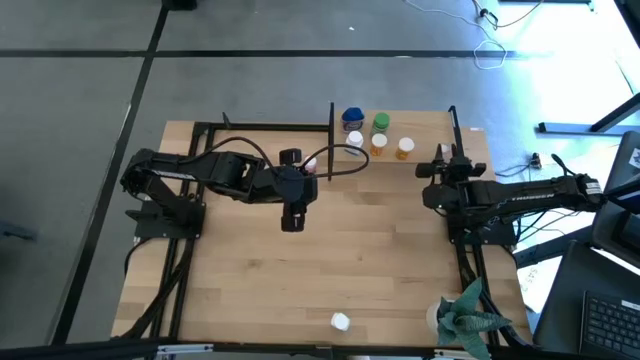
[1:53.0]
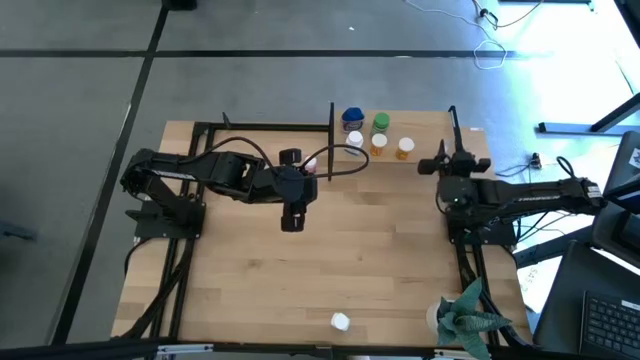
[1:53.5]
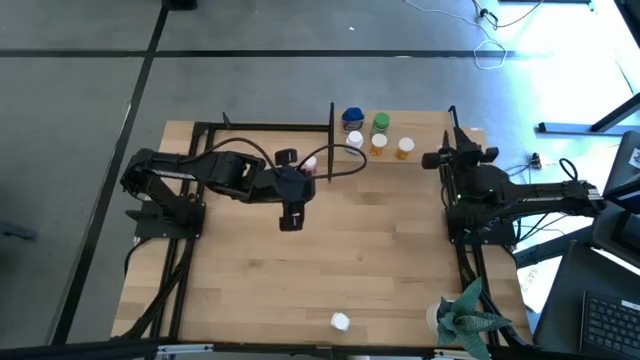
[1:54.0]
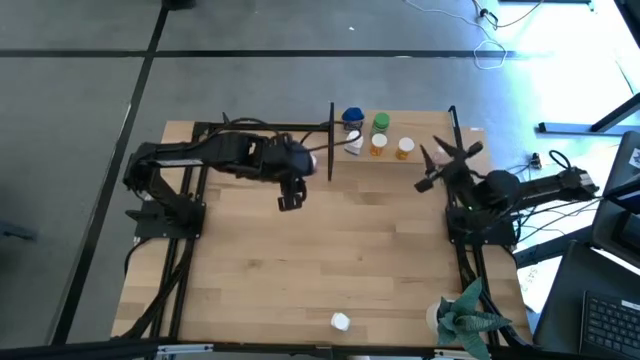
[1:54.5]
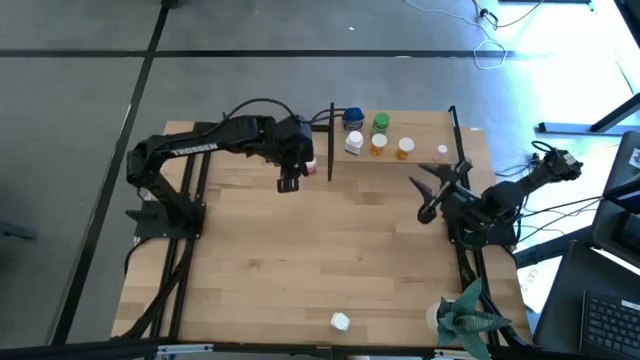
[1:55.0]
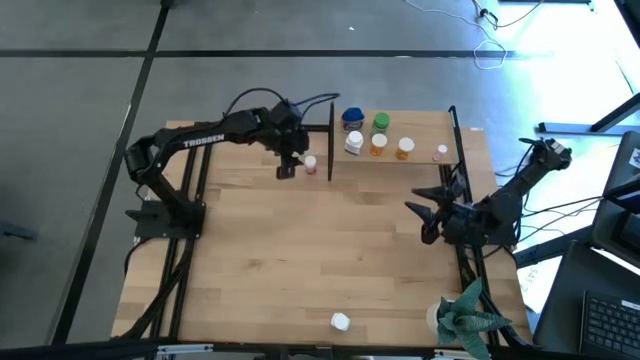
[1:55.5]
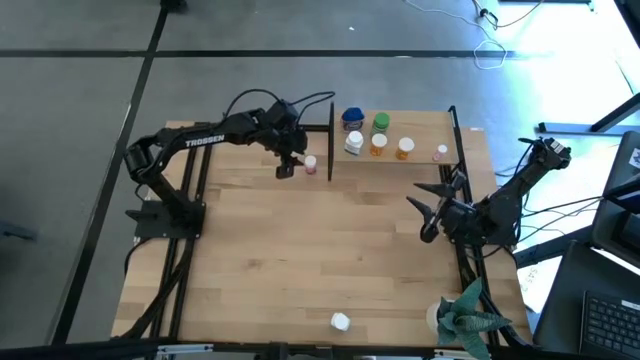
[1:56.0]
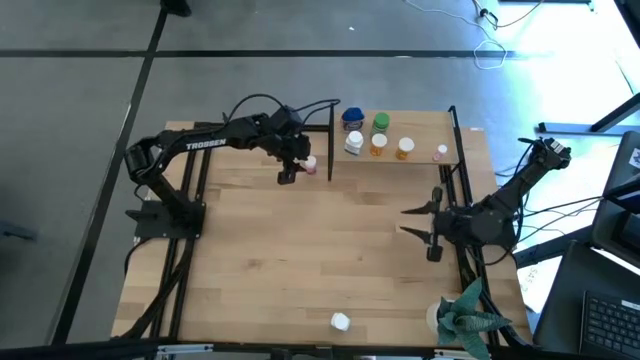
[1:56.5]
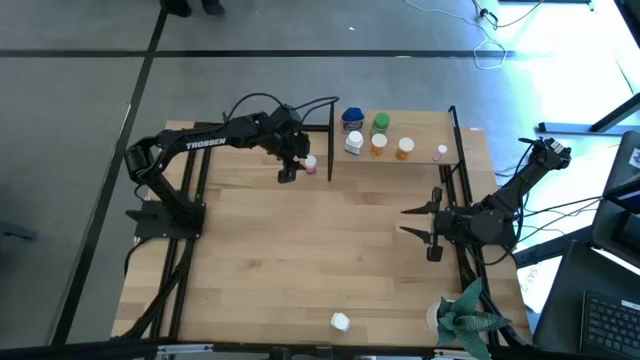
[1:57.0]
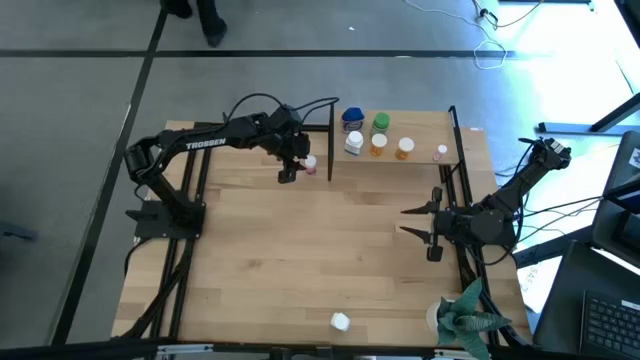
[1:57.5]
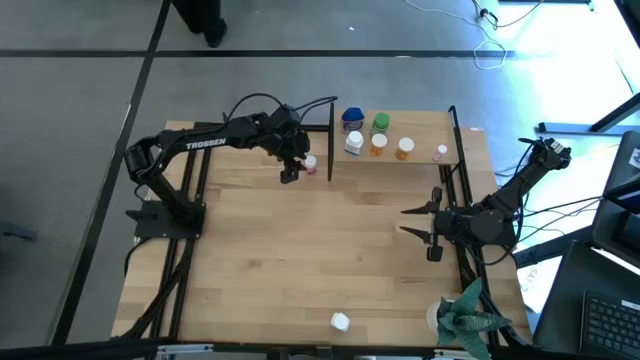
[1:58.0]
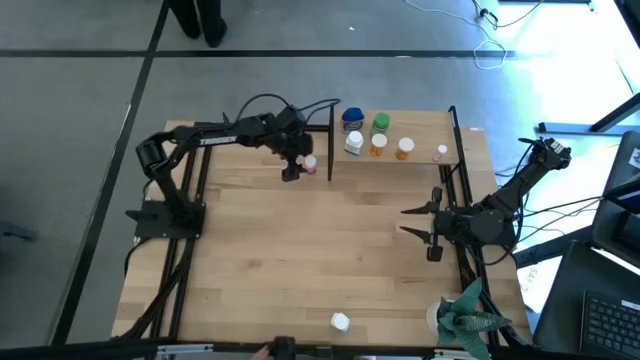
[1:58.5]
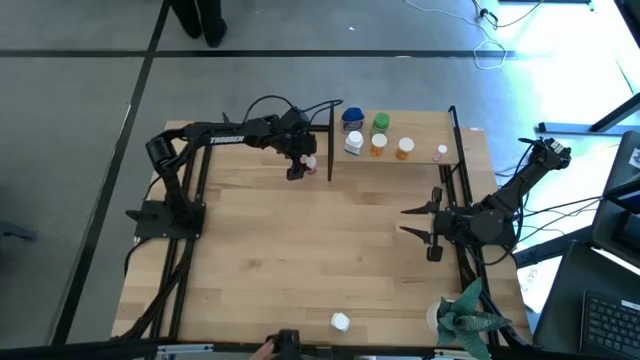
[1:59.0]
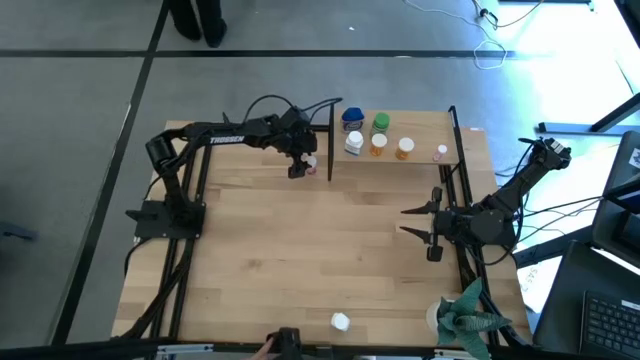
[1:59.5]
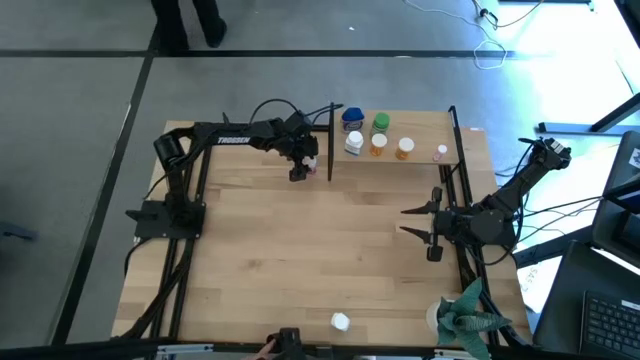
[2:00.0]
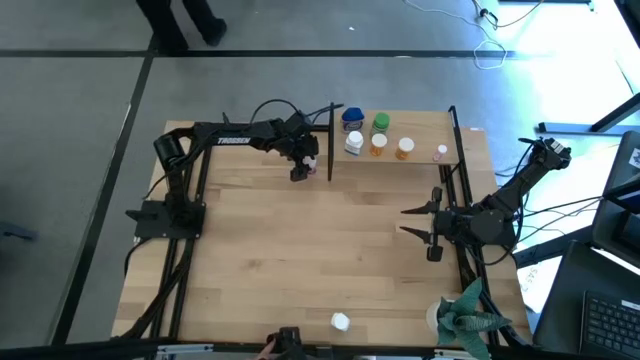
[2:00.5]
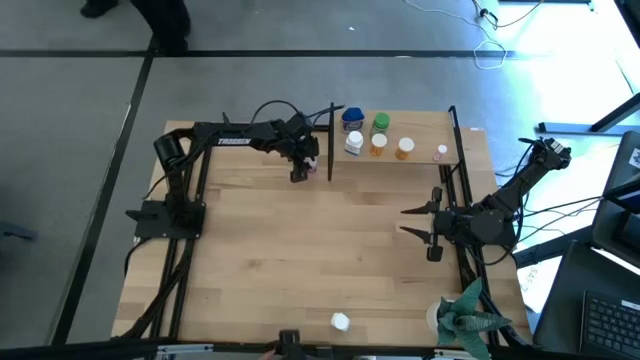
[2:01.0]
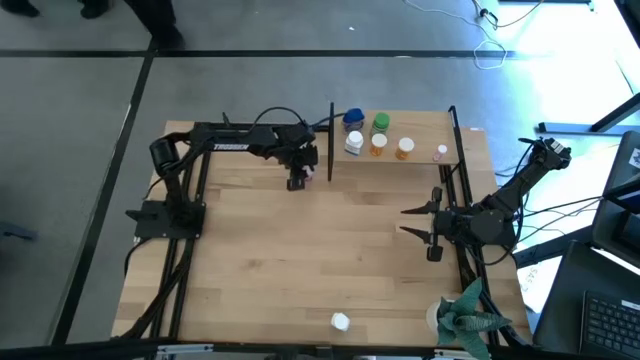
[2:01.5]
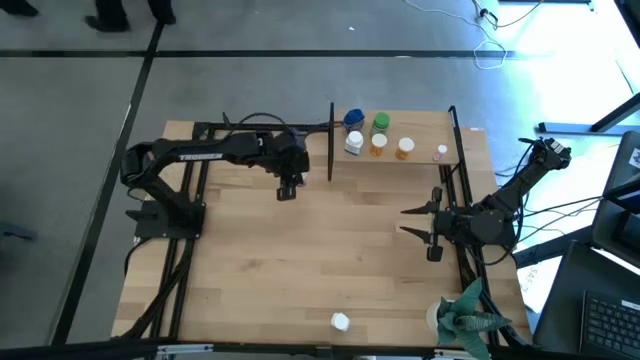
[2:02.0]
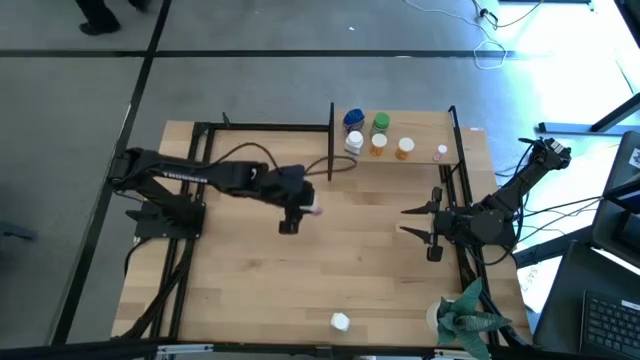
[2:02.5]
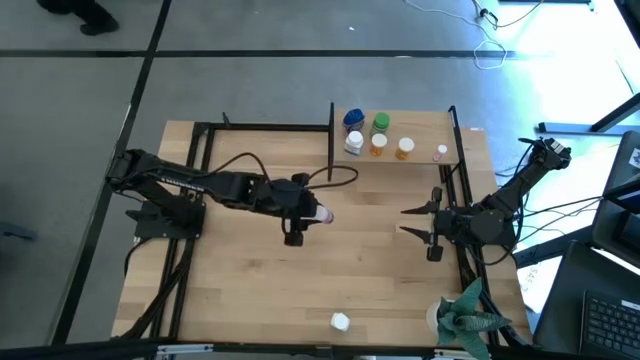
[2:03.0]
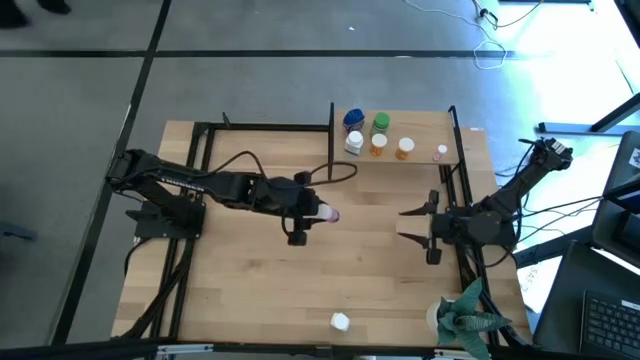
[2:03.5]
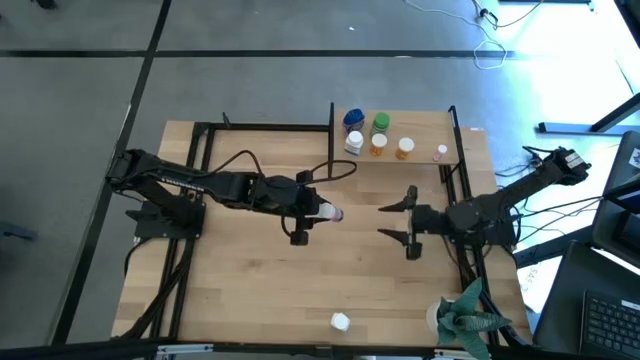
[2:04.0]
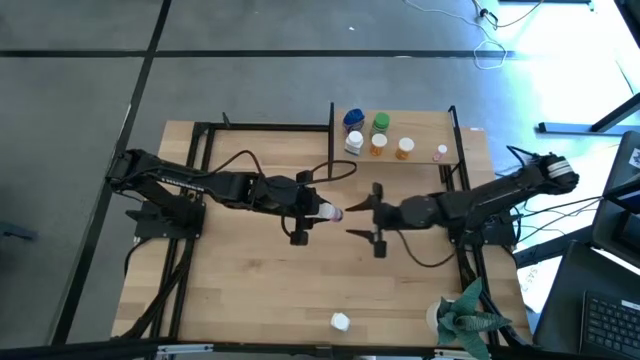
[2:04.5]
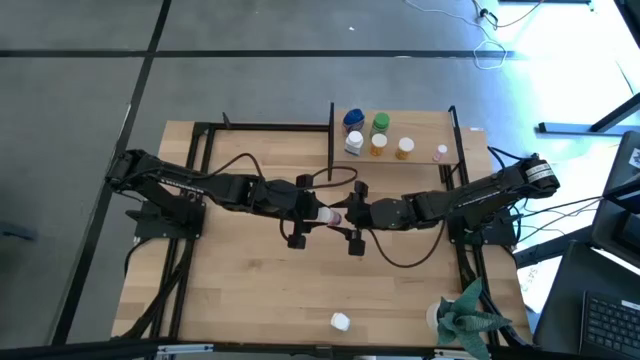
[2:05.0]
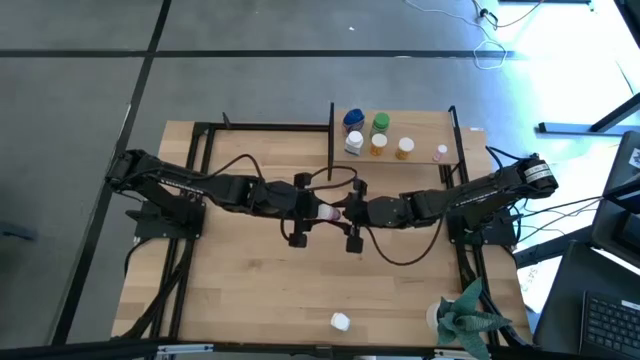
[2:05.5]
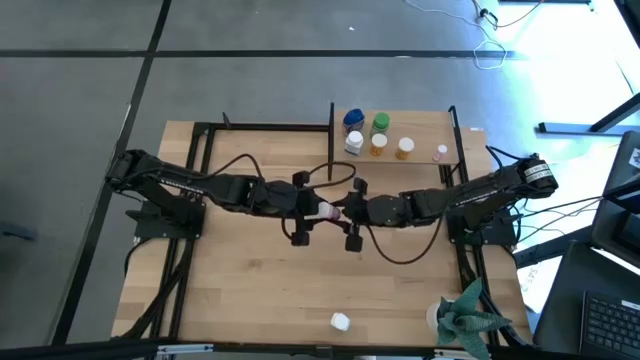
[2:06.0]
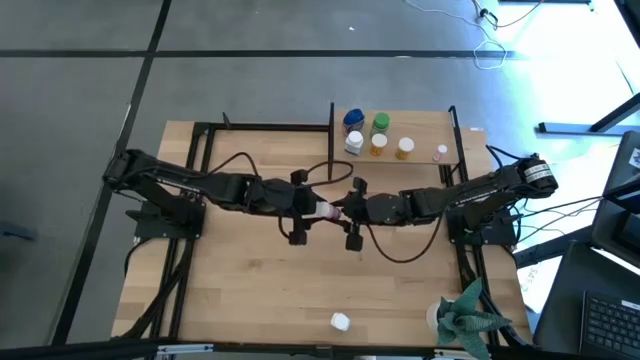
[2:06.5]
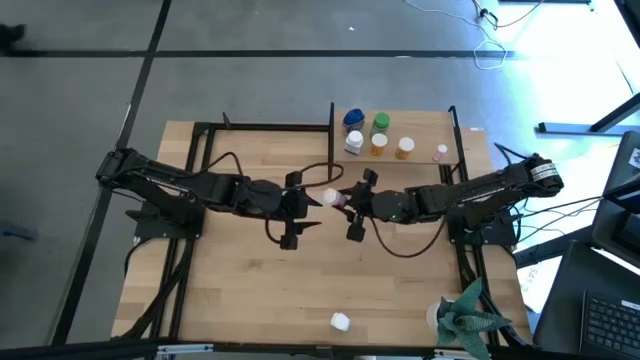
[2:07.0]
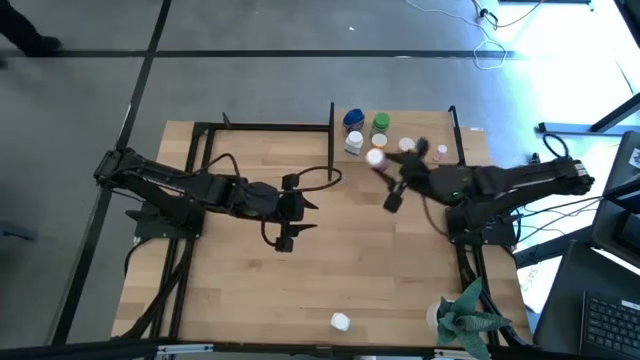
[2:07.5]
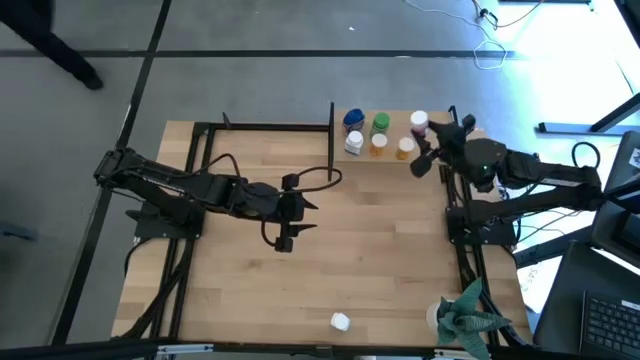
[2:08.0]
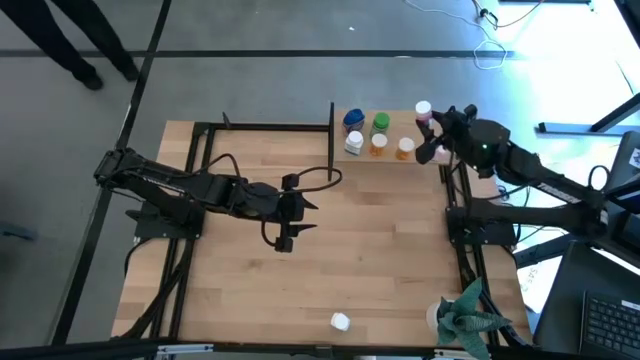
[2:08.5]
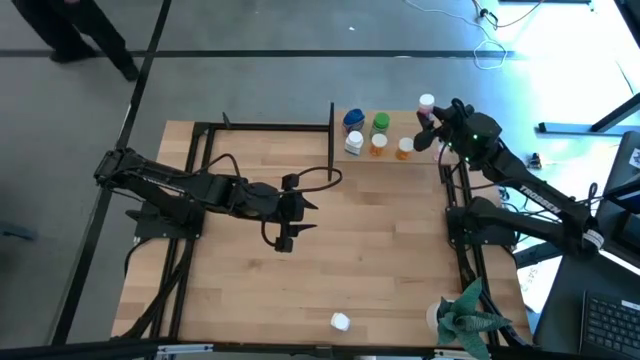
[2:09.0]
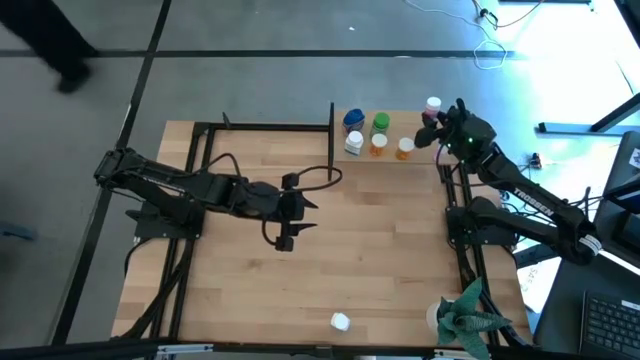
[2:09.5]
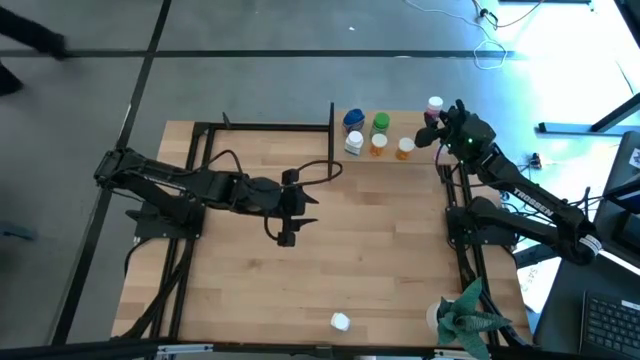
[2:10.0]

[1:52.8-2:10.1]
Task: Pick and place medicine bottles onto shelf by color
Put the pink medicine bottle on the shelf

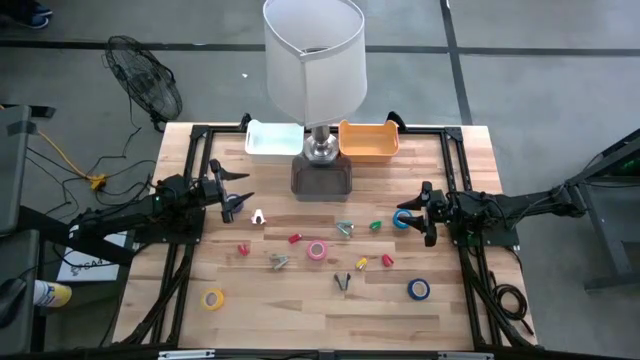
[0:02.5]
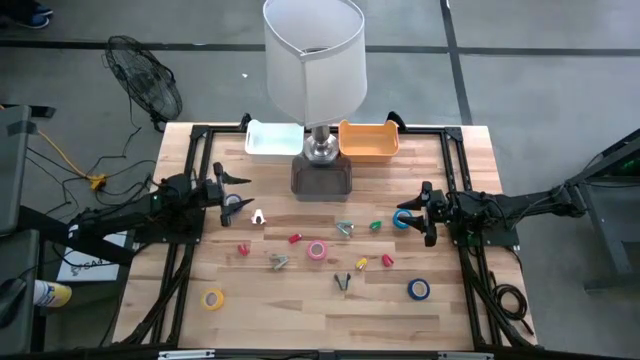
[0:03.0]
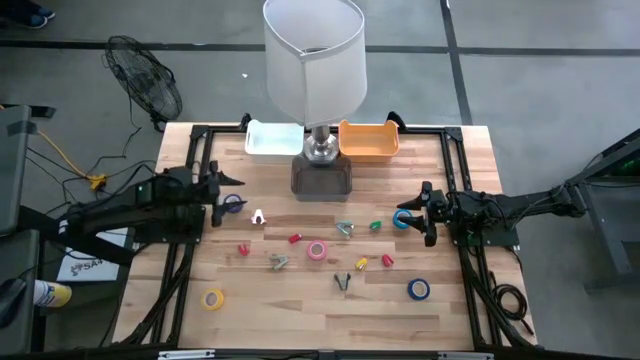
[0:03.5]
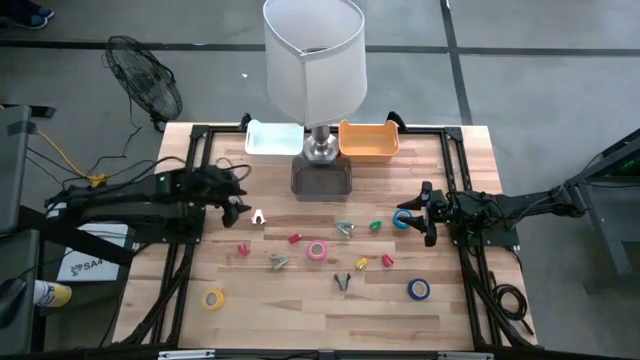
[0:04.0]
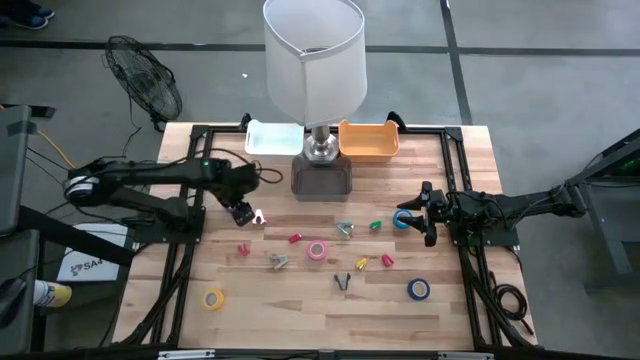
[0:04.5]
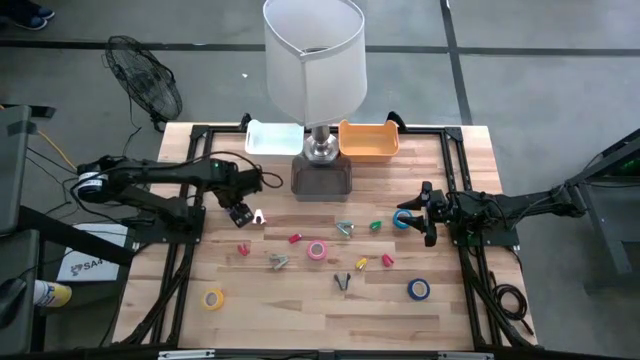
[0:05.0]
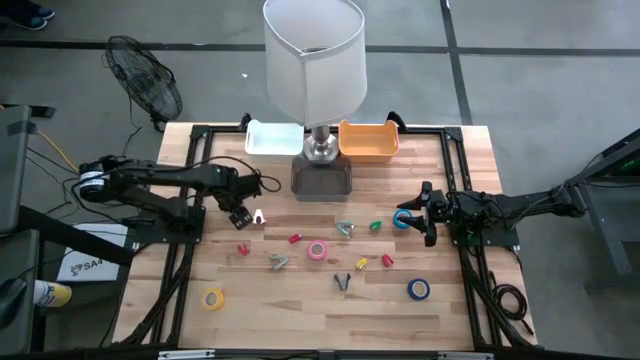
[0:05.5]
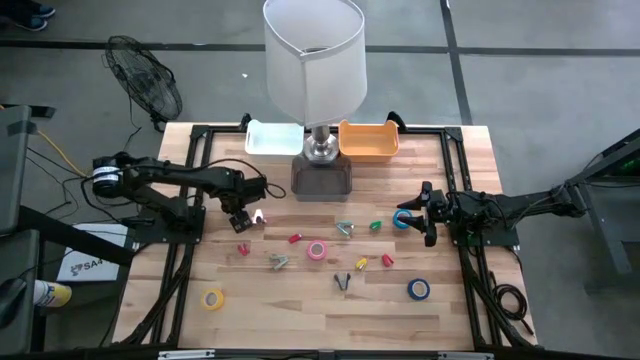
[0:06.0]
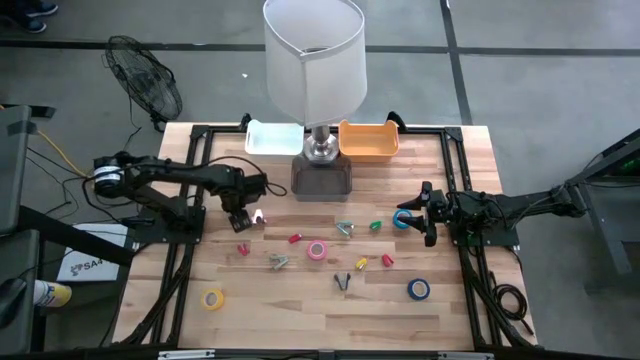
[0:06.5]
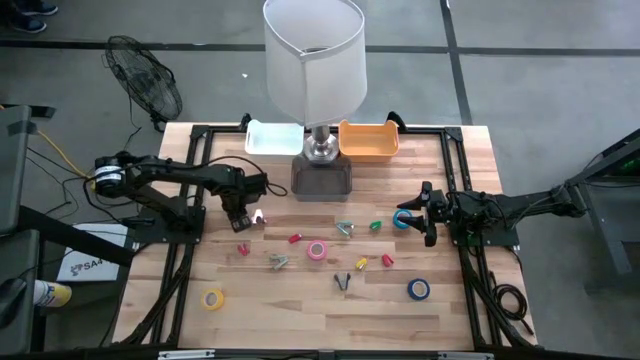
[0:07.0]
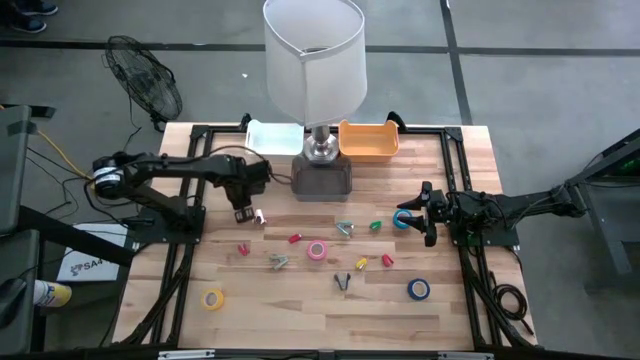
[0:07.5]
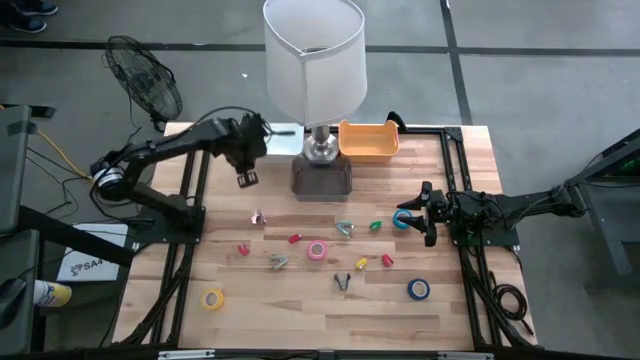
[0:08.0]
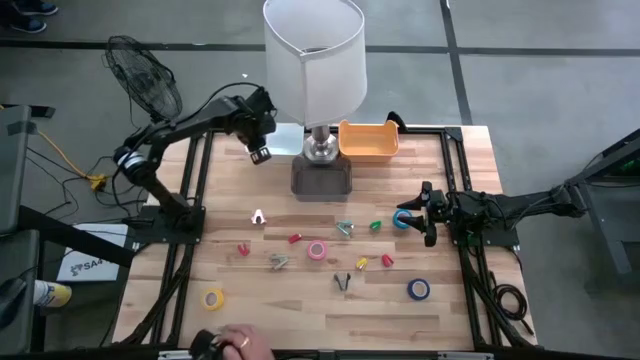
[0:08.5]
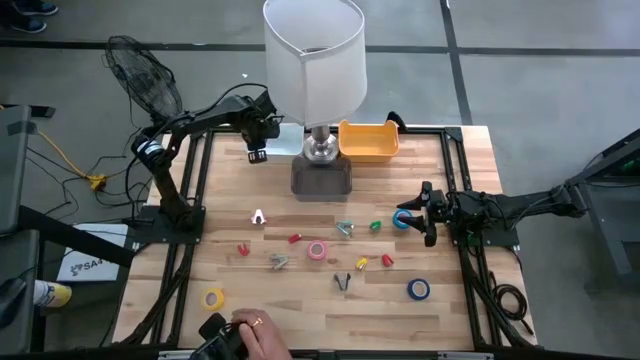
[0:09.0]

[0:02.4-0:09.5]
Task: Pick and place Stapler, Stapler remover, tape
Put the violet tape into the white bin
